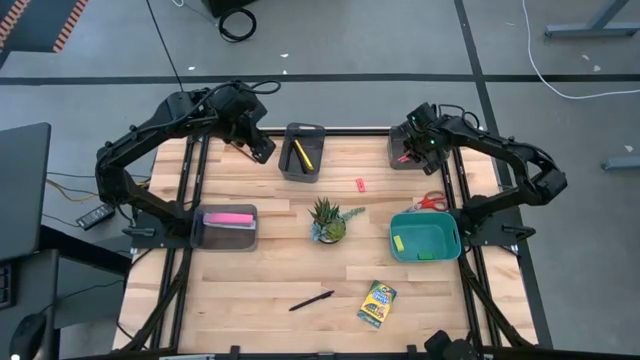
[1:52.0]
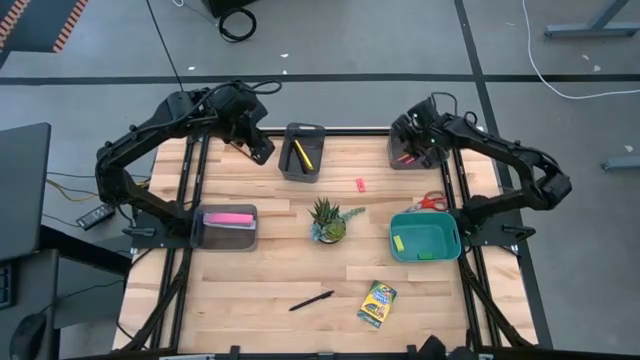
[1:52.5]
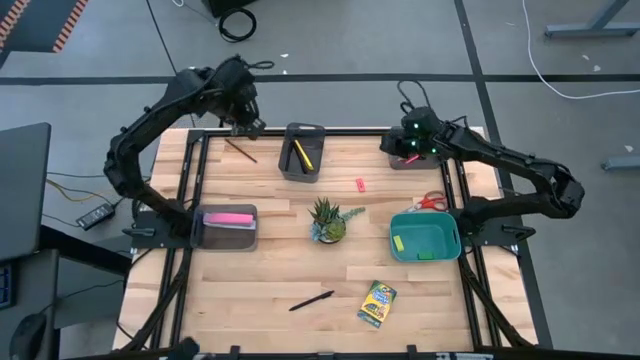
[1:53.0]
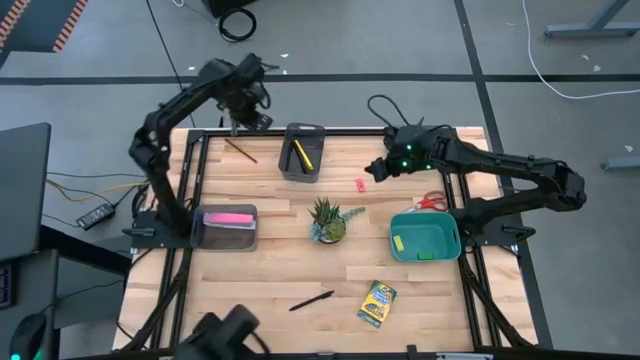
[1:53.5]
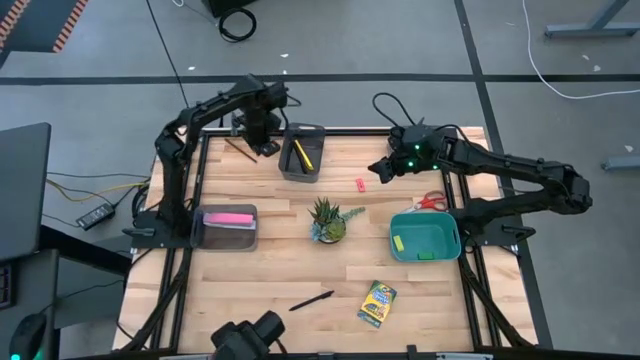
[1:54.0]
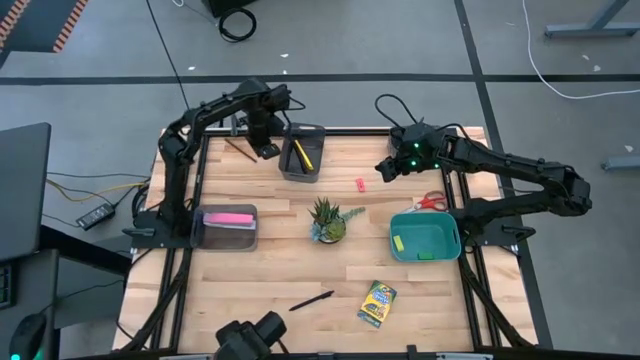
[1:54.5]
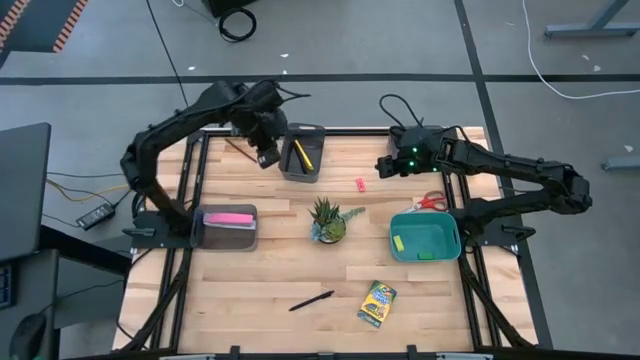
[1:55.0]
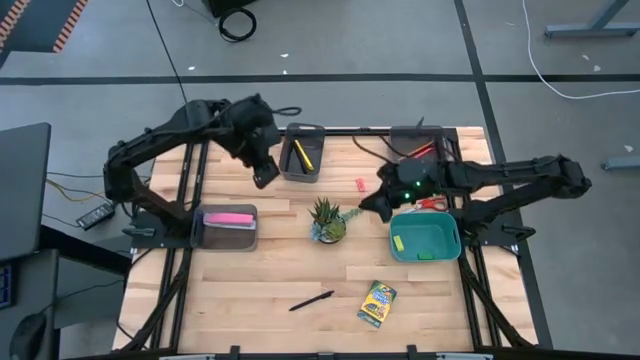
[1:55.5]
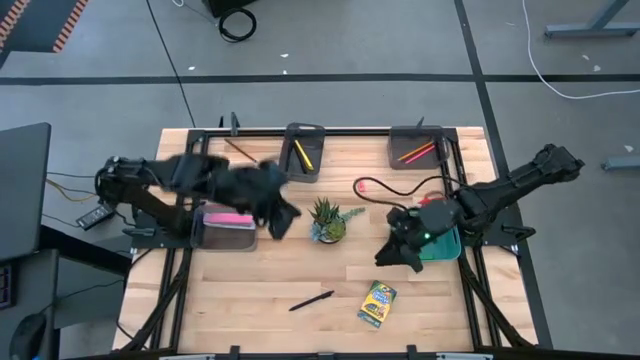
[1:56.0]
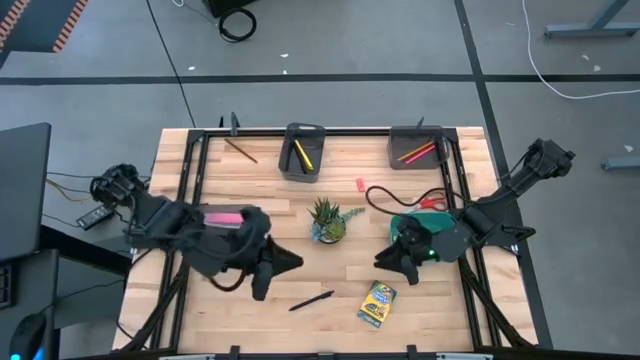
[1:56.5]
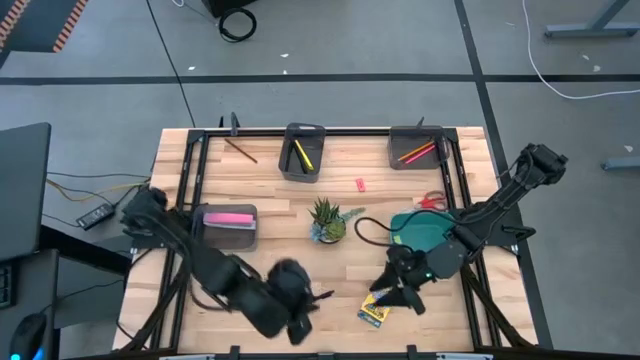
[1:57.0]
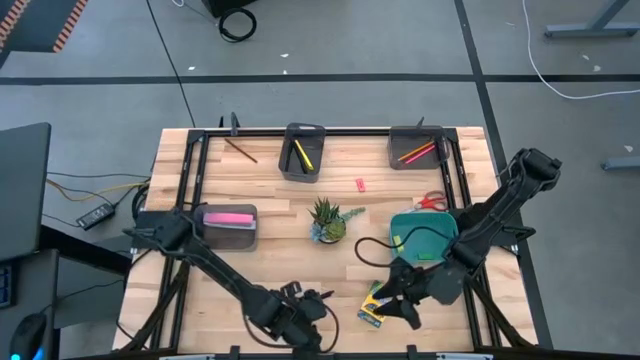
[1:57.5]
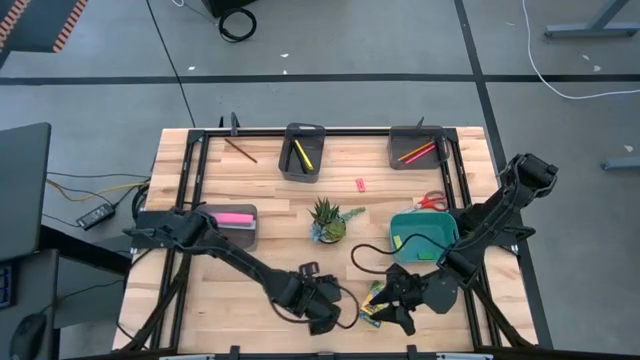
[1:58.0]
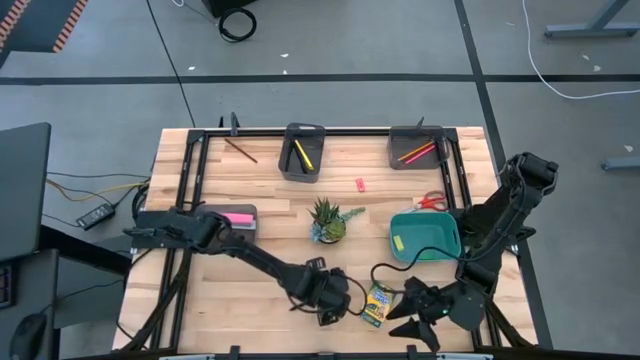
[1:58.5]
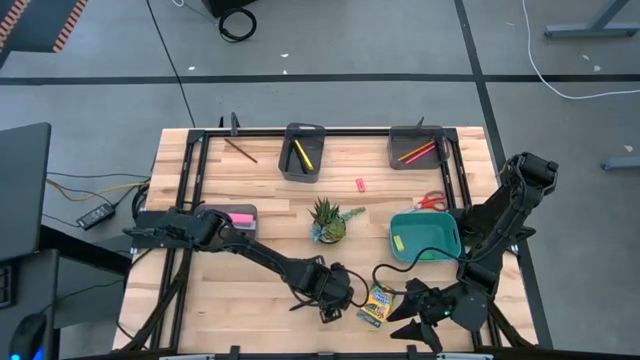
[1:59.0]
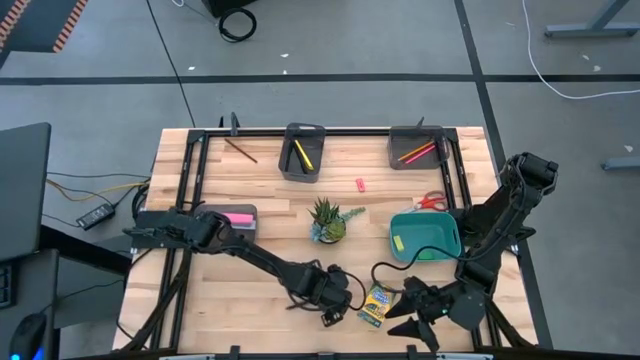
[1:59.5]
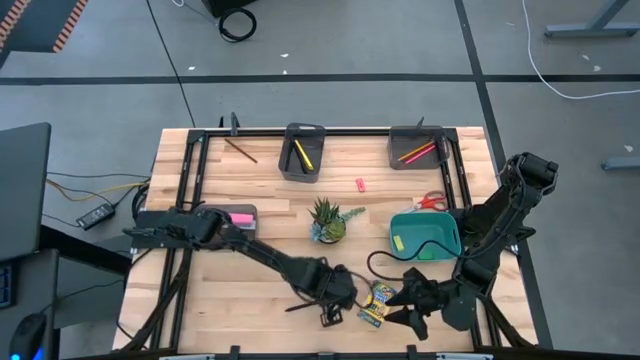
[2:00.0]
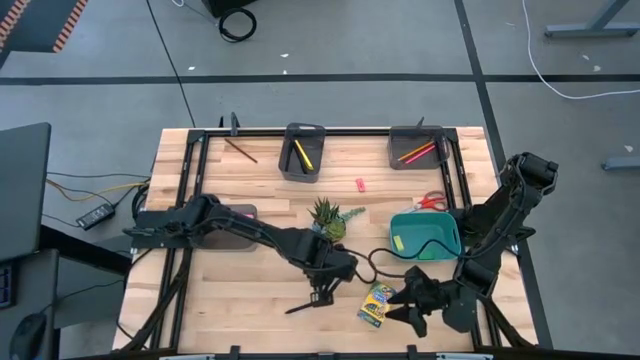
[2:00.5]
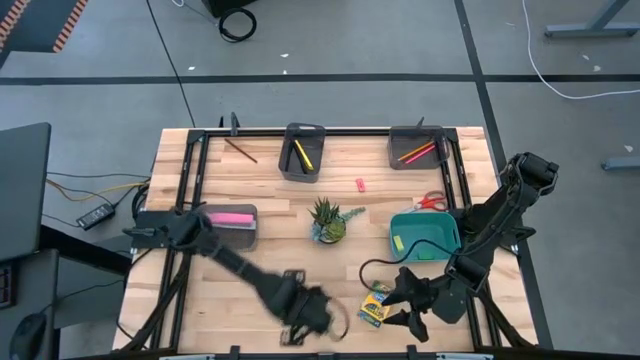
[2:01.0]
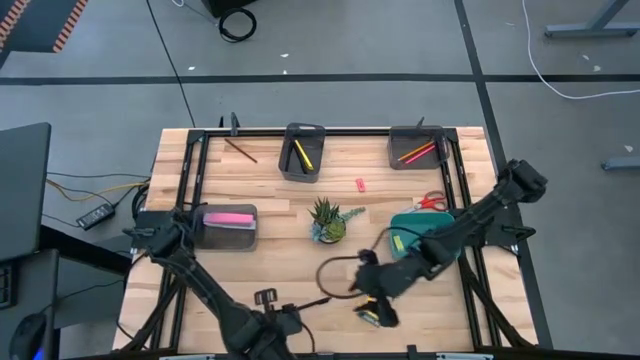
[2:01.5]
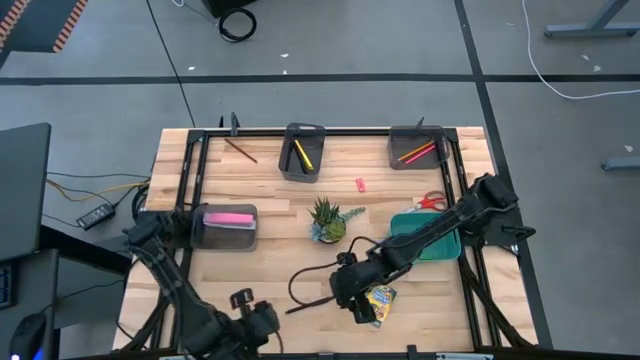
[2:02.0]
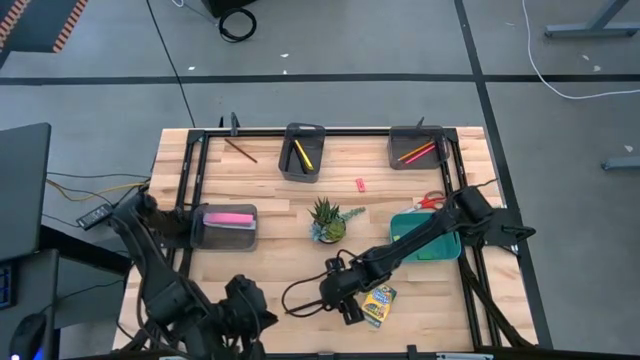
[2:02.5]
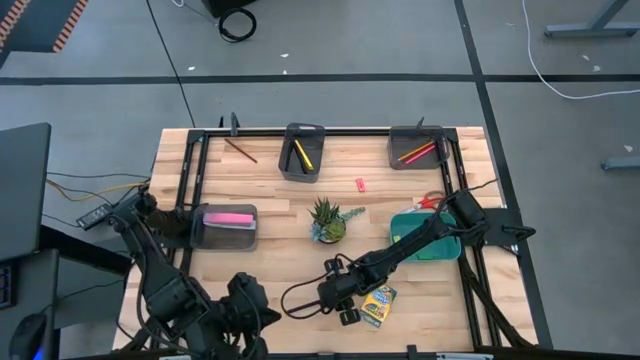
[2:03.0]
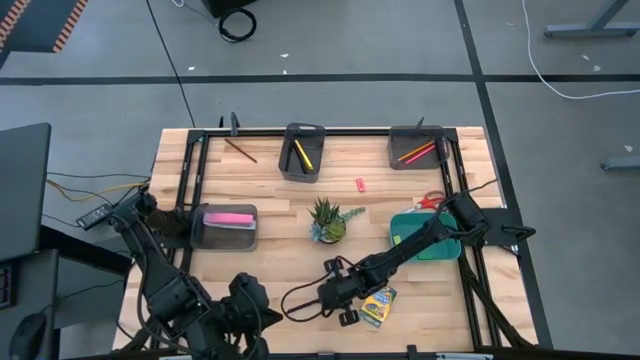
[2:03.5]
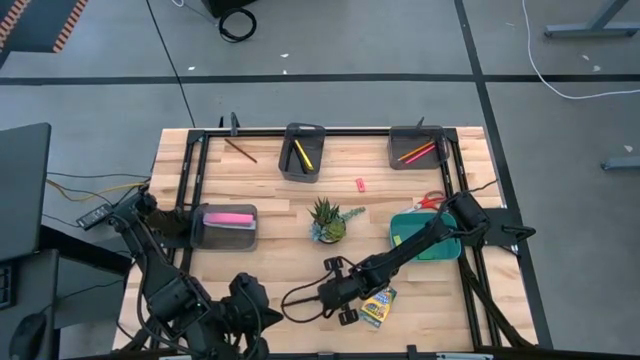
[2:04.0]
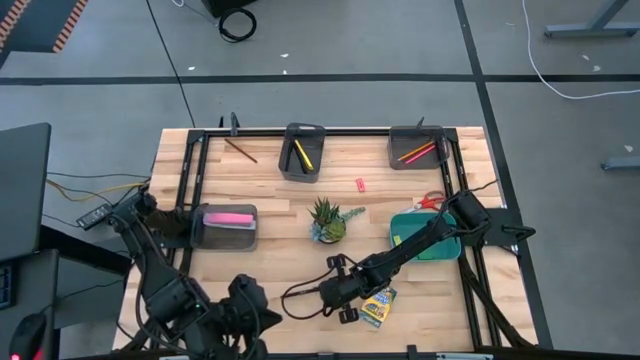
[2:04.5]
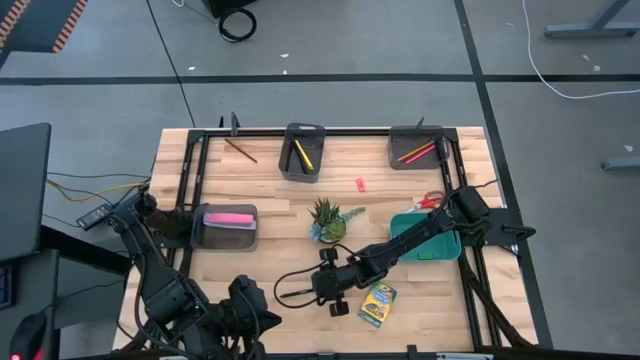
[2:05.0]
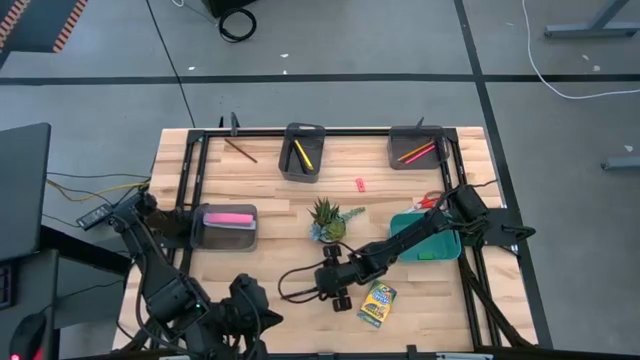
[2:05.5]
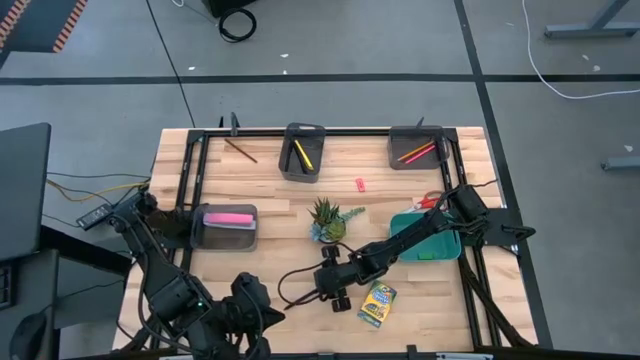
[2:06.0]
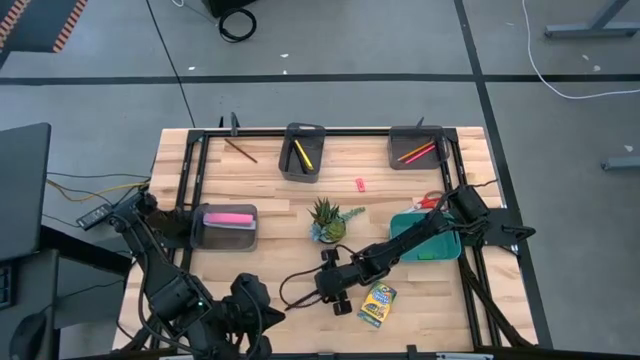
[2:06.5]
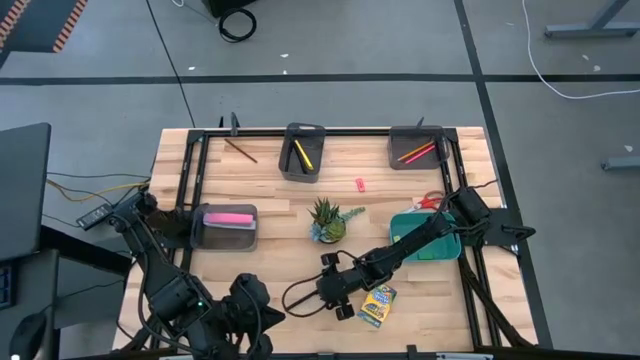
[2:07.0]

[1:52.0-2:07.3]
Task: Sort crayons/erasers/pens/pencils in bins
Put the black pen into the left black bin

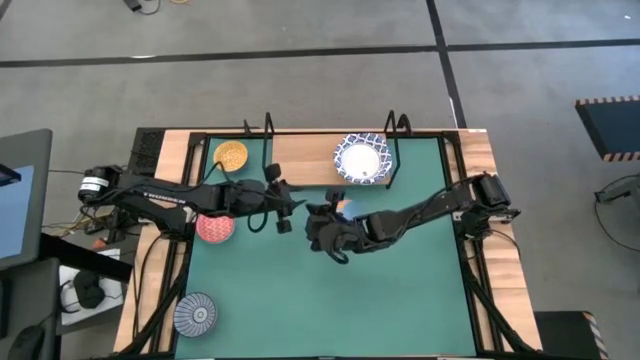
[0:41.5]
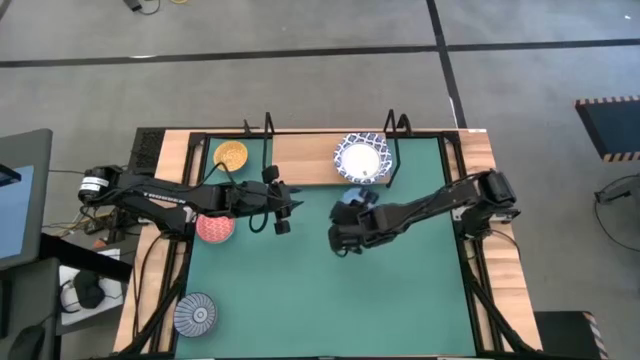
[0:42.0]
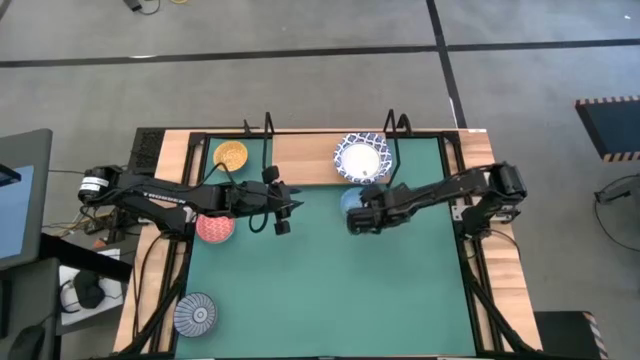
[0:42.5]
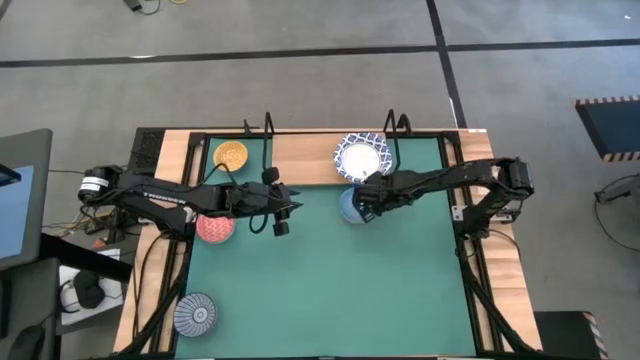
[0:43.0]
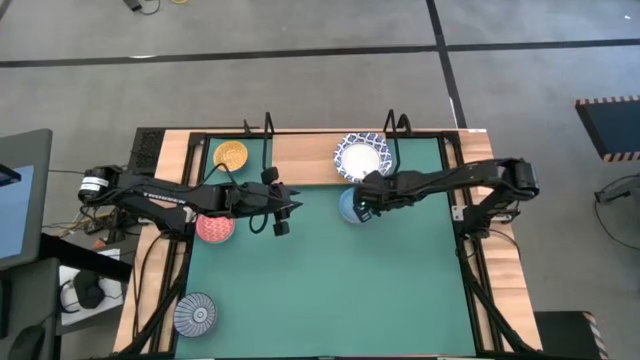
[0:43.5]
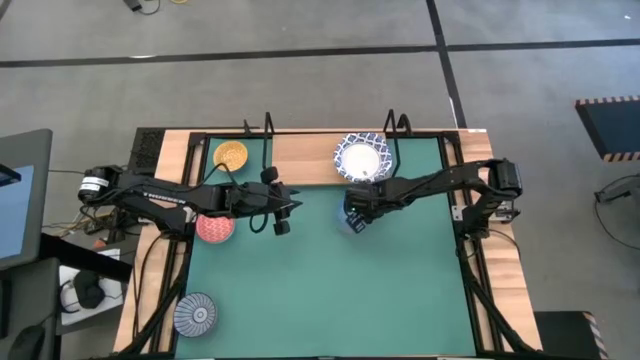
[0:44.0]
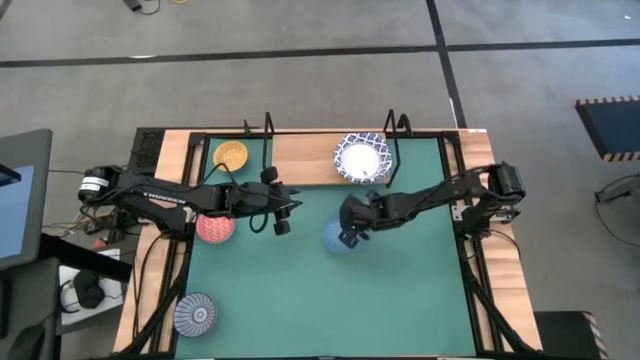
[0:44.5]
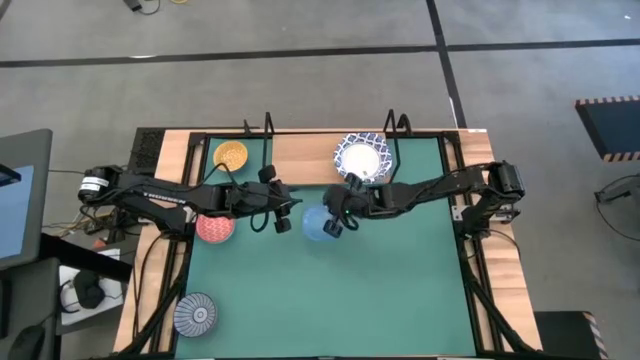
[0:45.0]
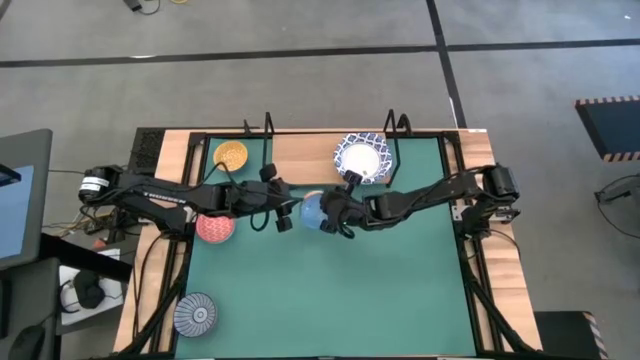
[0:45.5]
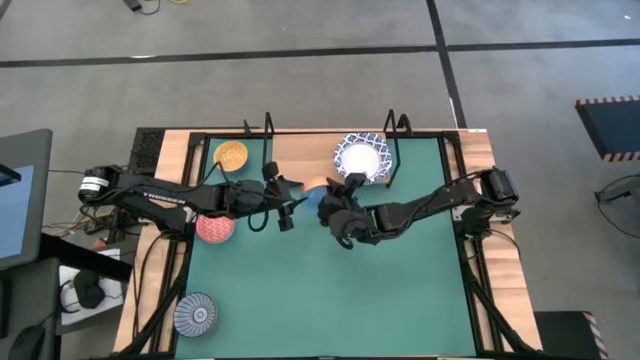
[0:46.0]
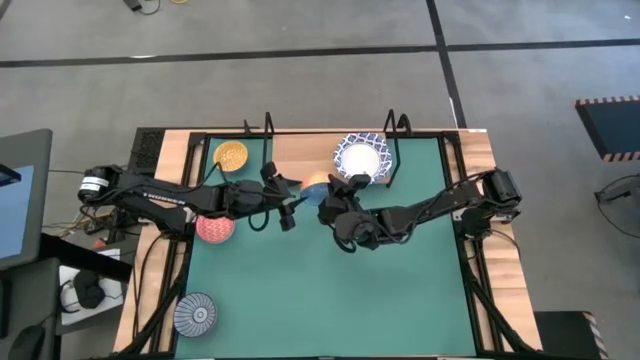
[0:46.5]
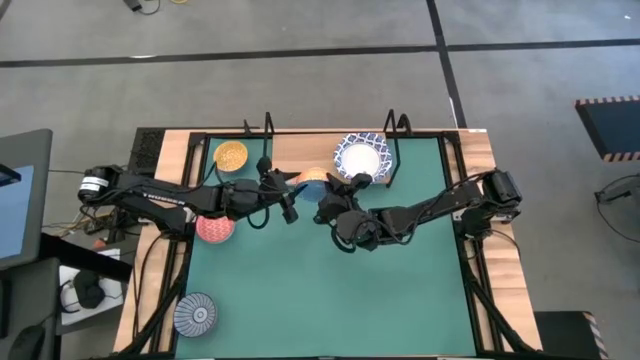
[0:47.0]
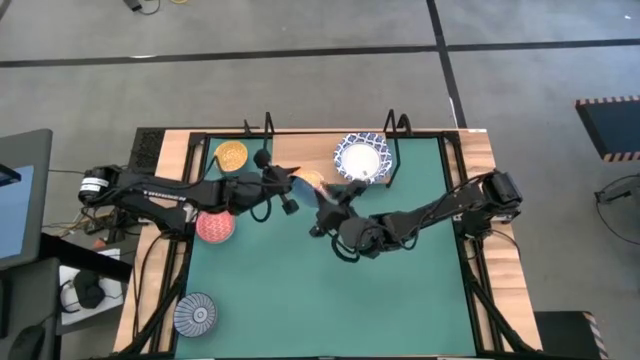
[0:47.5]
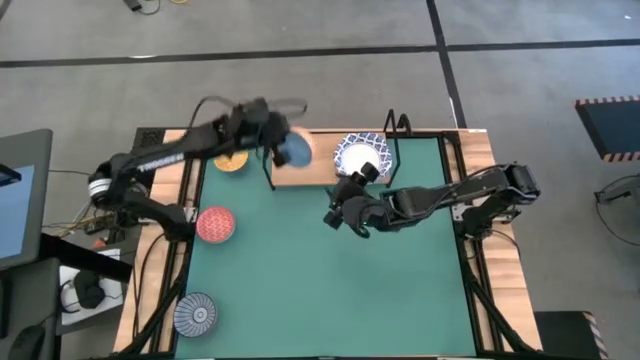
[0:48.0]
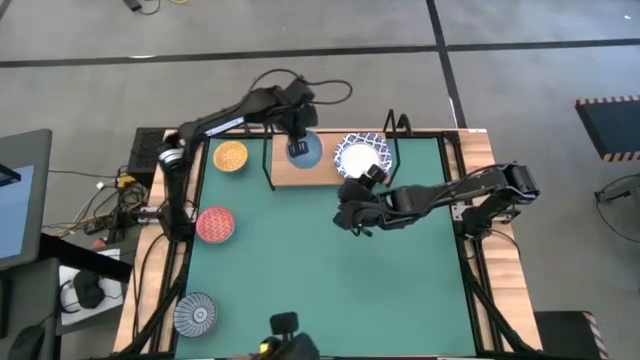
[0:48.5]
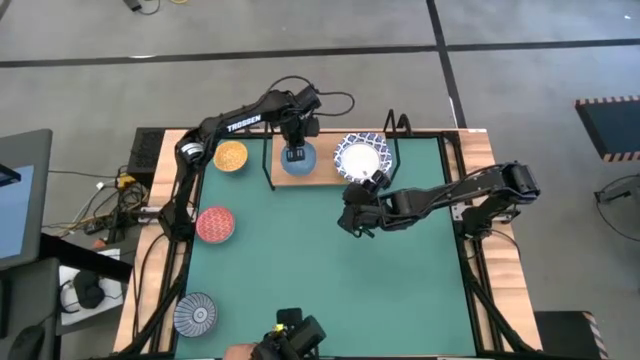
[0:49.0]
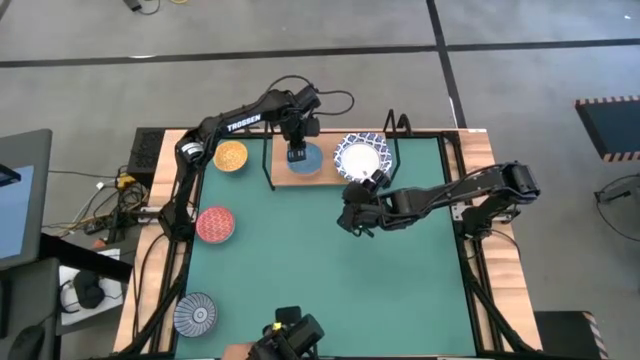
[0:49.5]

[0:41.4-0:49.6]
Task: Place and stack bowls onto a shelf
Put the blue patterned bowl on the shelf
